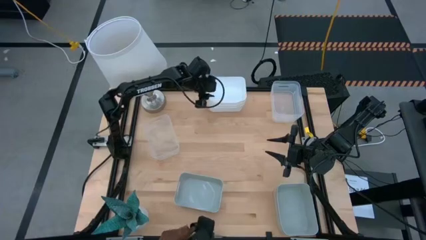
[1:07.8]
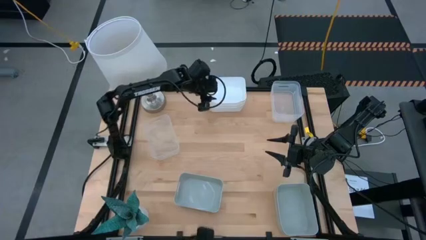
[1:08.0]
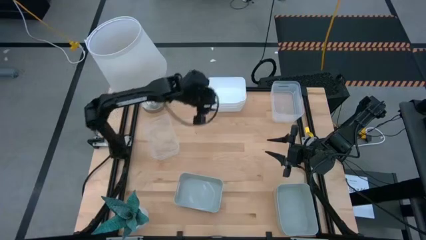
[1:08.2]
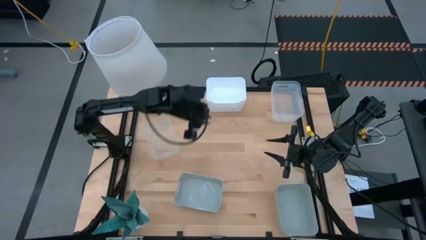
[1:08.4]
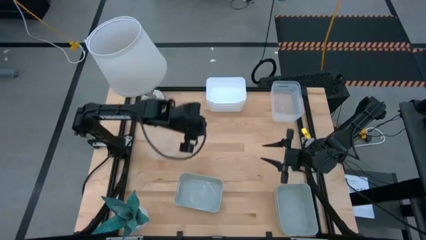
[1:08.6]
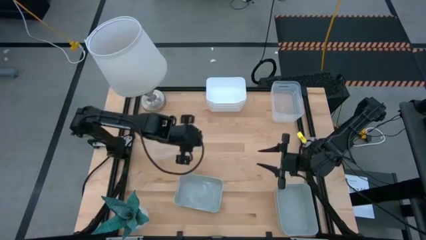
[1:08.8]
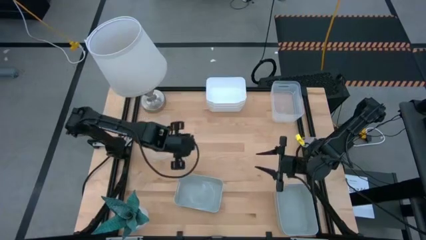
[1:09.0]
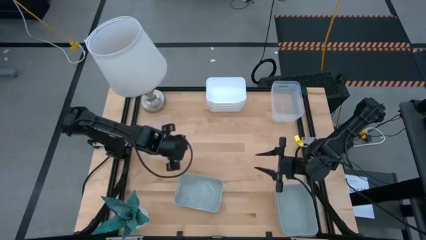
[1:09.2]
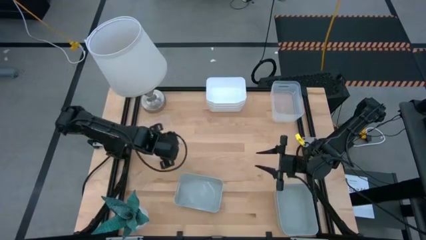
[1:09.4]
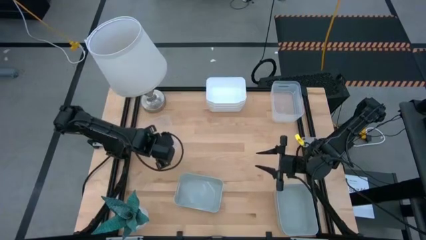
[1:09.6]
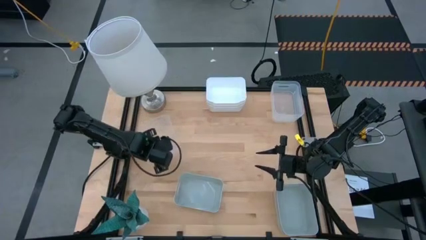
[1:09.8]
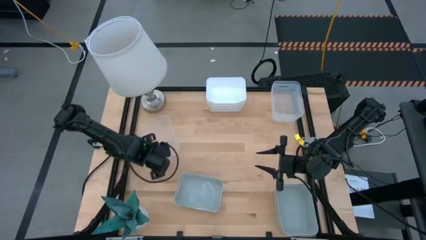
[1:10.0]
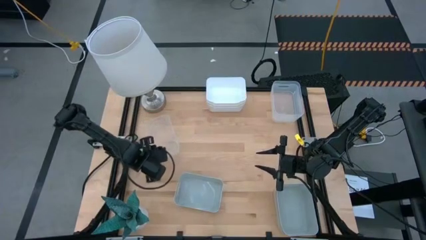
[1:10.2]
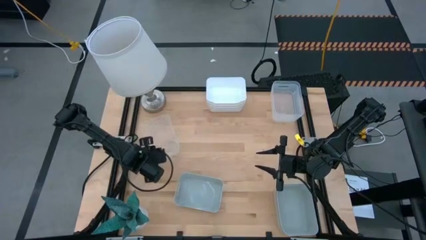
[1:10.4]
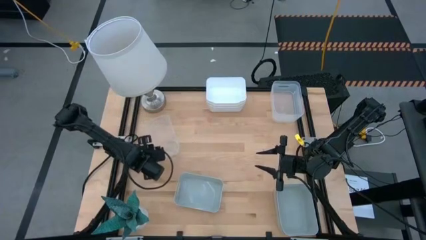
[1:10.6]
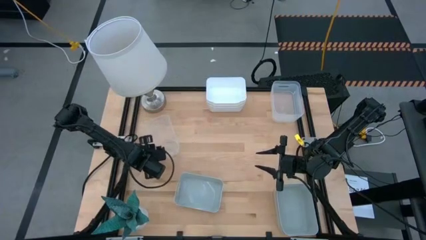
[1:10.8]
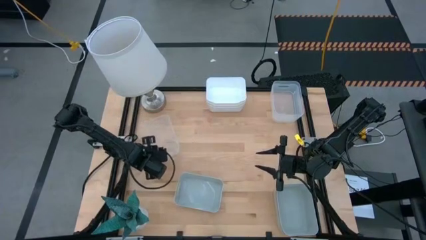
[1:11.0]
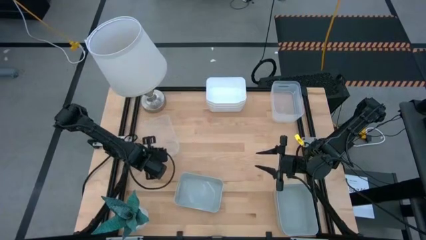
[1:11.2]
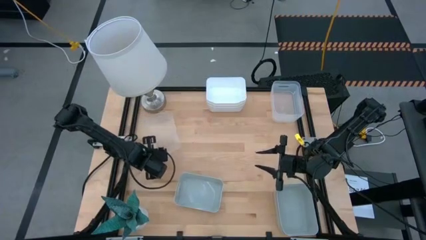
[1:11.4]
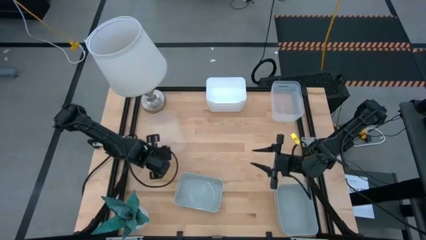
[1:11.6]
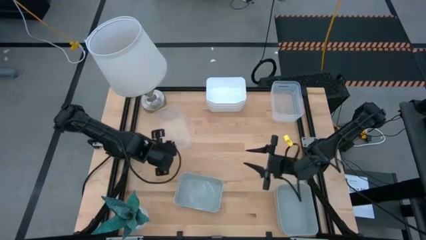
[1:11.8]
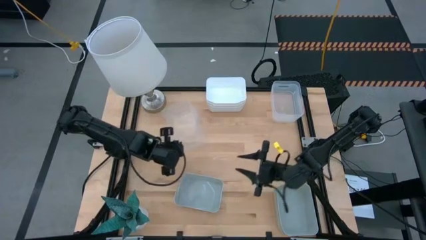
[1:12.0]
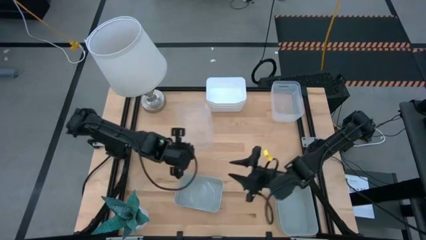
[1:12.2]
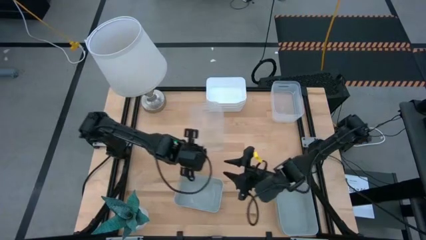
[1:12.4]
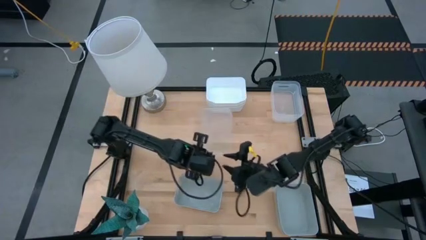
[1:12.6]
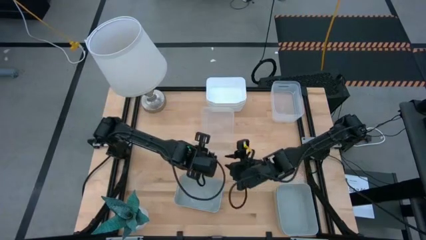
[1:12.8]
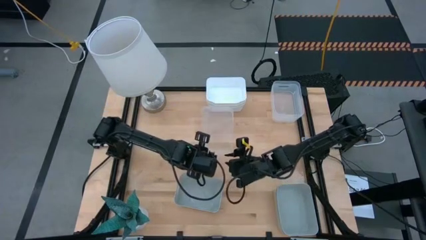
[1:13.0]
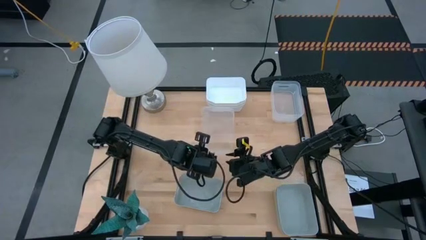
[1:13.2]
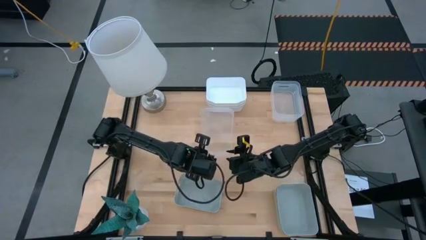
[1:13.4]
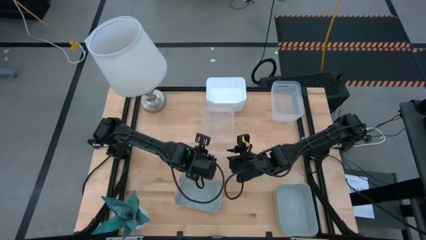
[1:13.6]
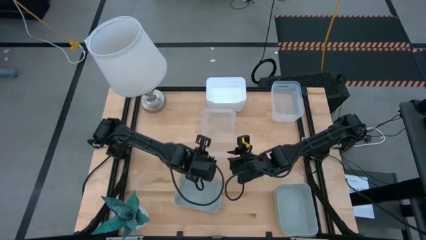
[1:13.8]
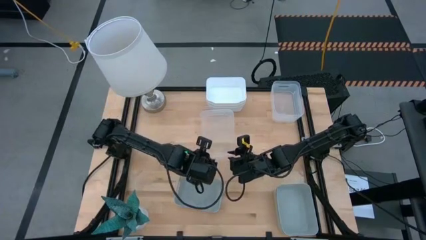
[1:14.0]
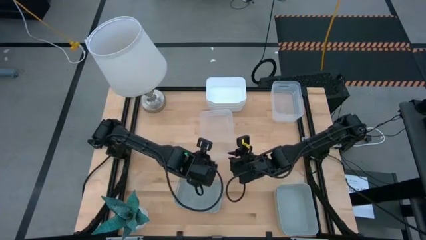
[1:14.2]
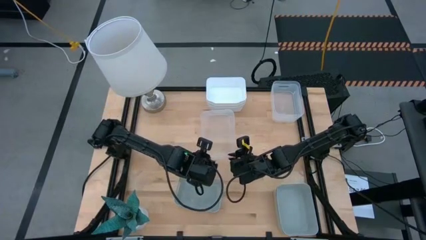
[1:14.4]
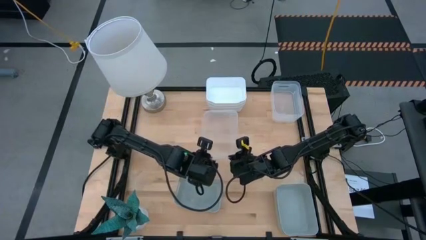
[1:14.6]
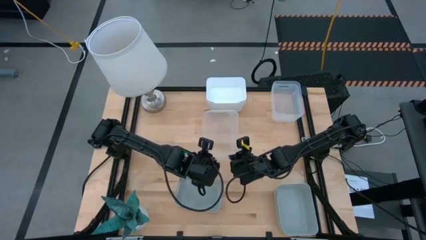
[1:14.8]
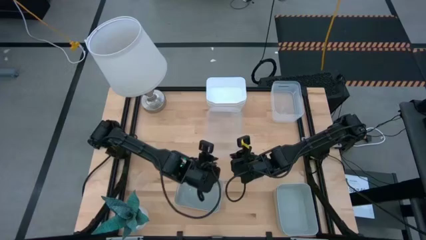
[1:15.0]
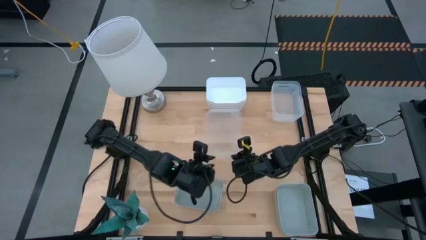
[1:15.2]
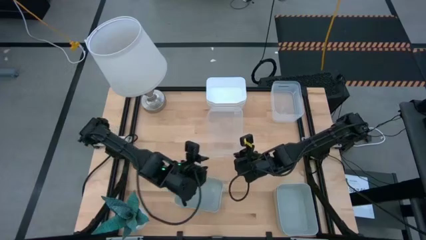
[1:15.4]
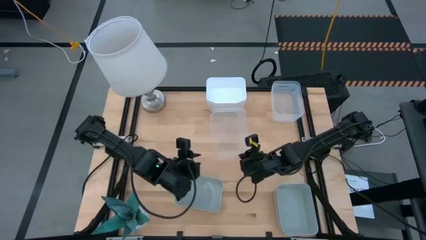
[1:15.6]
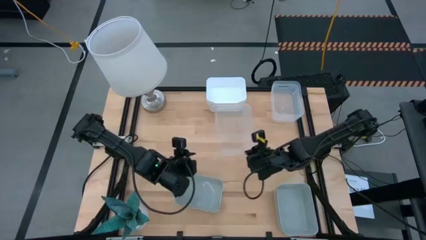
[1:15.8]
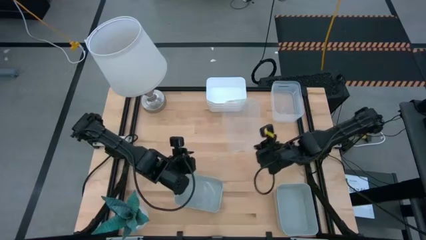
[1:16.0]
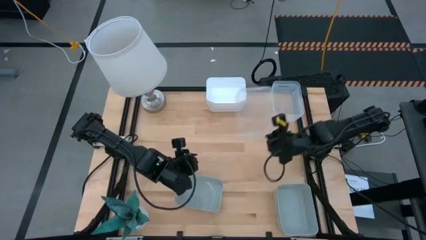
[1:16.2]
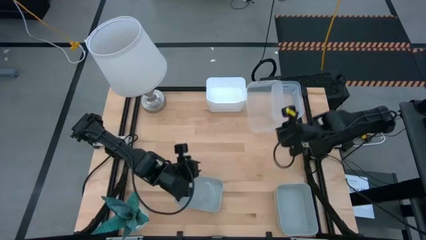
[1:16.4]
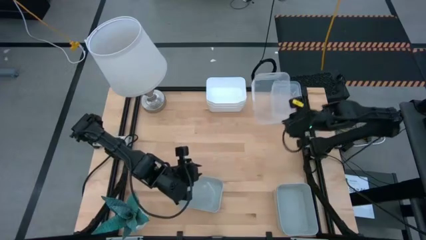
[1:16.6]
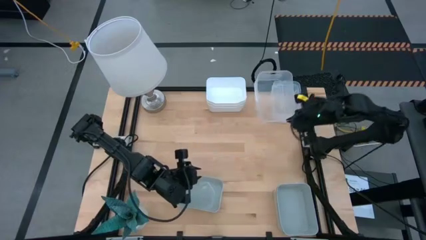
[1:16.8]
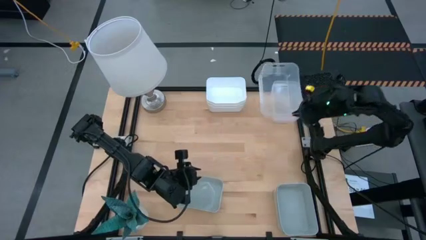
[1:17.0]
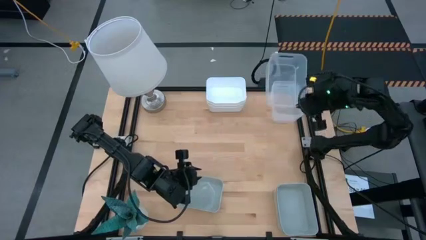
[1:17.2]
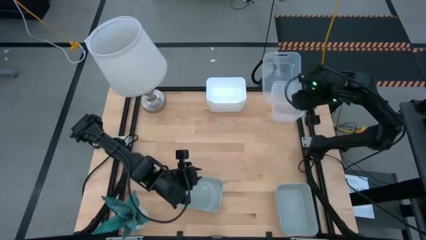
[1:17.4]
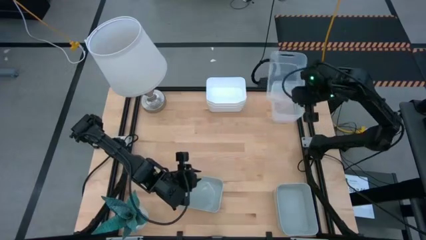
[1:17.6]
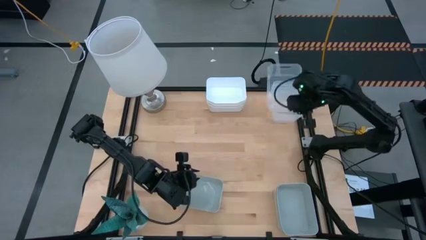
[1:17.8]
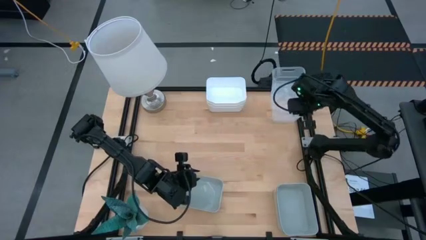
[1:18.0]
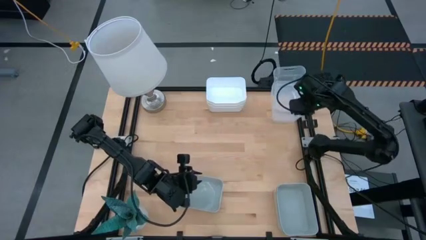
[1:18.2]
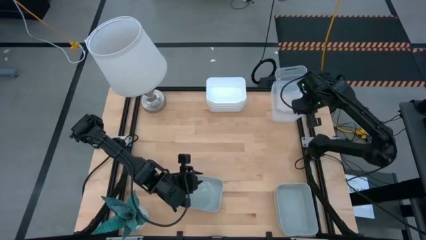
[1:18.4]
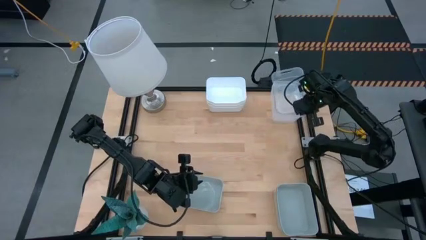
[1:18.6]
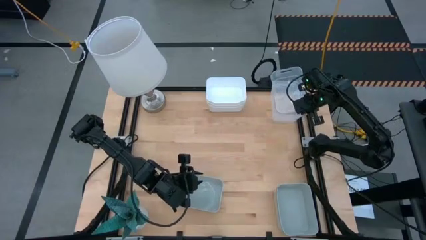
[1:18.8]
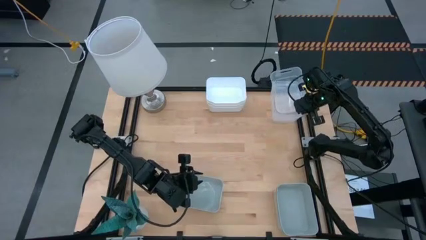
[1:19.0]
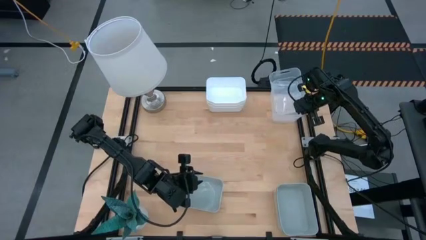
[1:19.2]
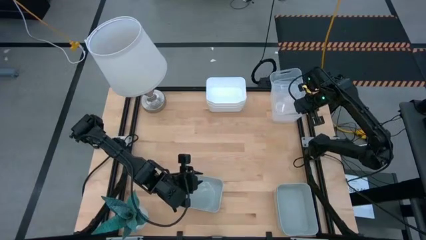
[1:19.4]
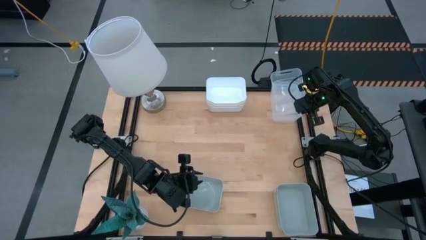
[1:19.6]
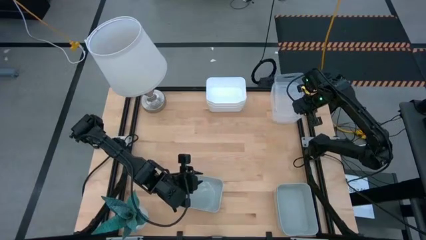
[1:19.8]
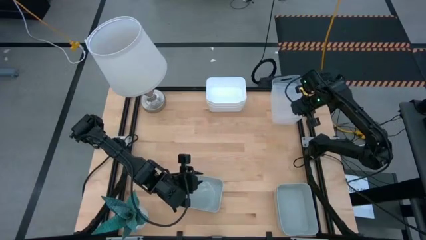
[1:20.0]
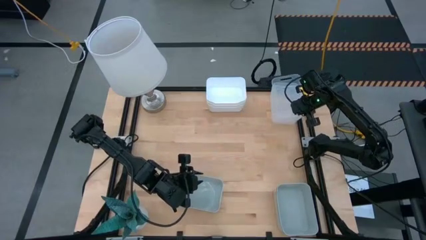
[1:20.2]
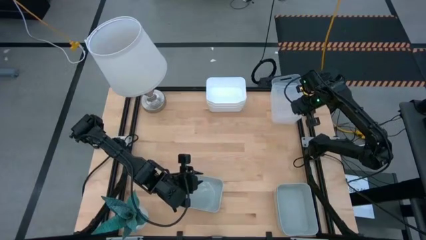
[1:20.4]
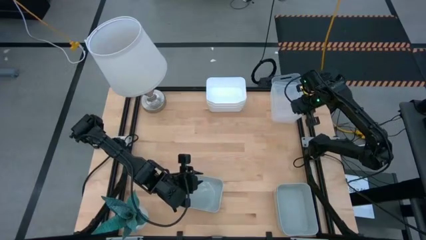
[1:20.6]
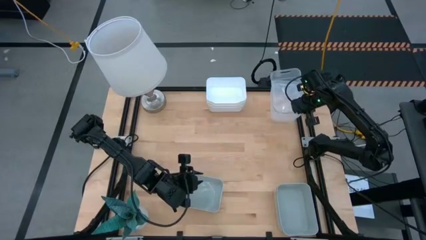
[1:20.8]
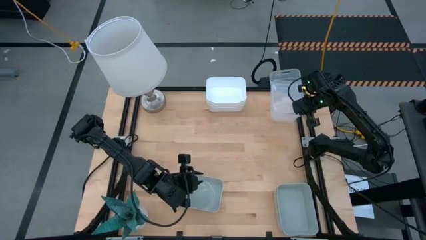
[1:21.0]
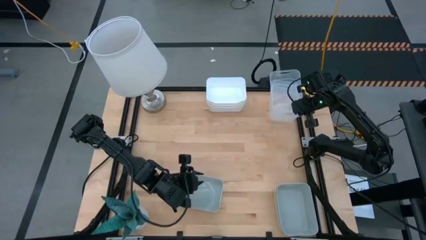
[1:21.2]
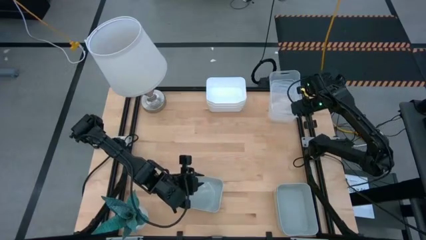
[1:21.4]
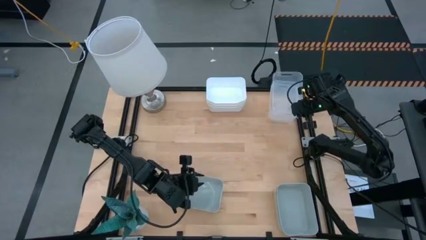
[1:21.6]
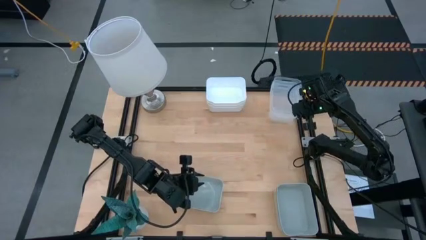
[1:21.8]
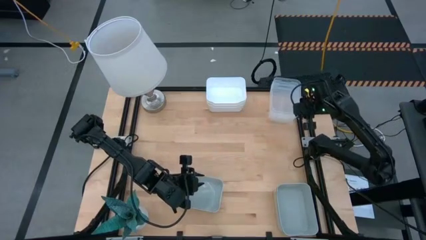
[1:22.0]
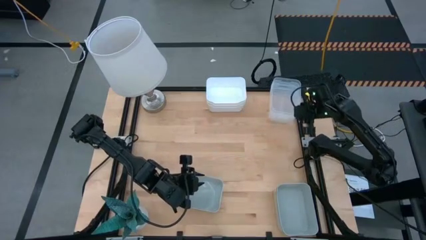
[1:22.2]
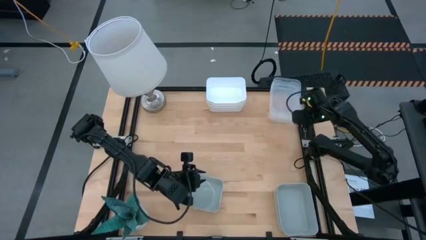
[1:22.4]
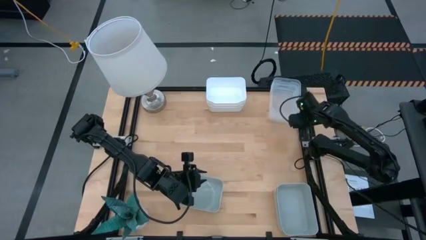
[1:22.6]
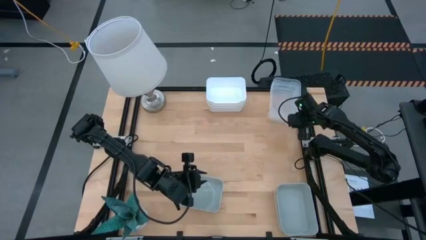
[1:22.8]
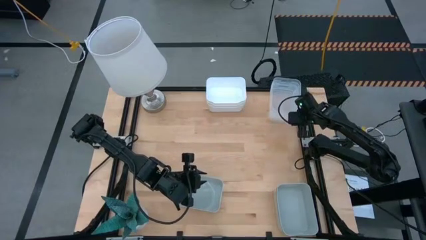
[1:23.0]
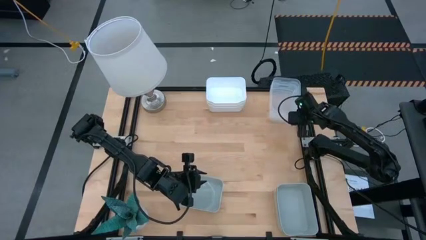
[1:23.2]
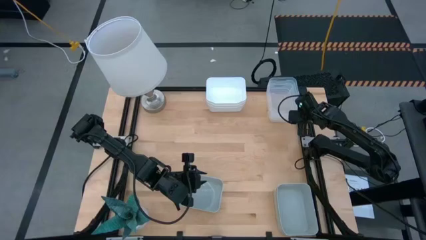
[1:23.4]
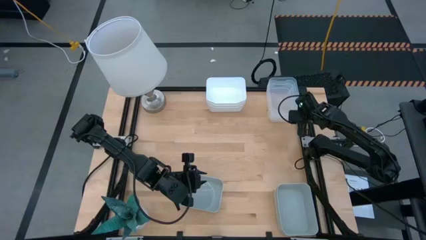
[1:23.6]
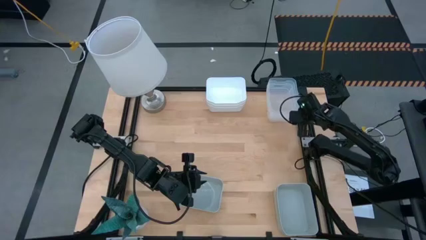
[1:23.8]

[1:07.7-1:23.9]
Stack the left transparent bin on the transparent bins
